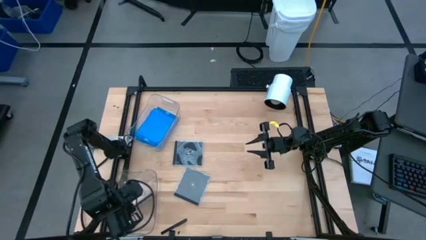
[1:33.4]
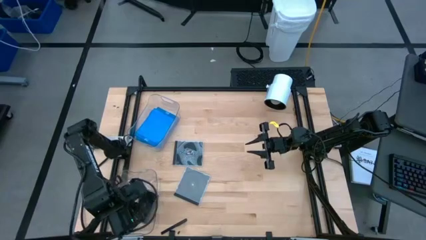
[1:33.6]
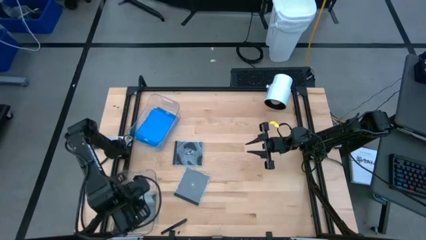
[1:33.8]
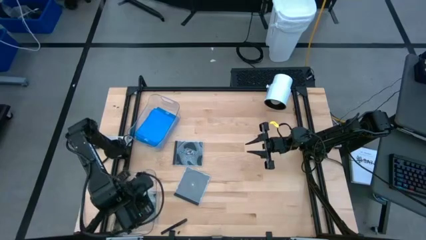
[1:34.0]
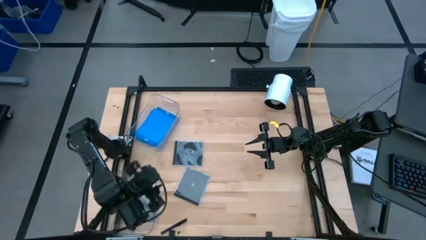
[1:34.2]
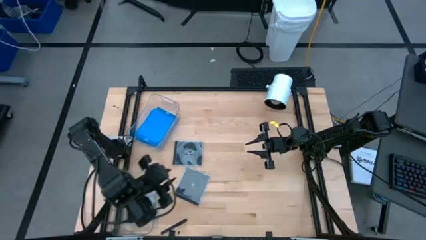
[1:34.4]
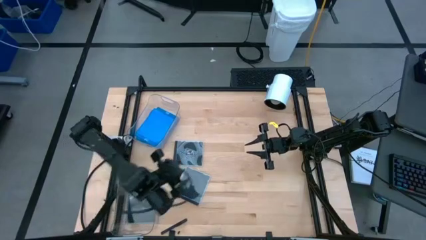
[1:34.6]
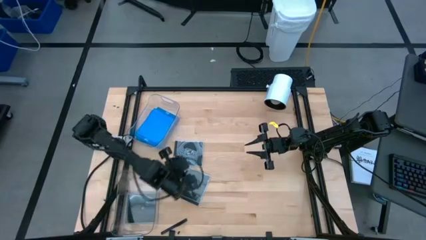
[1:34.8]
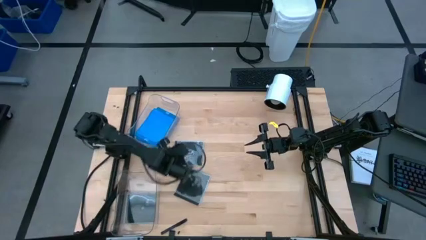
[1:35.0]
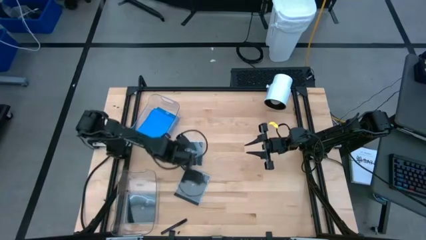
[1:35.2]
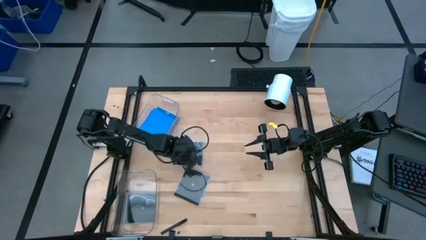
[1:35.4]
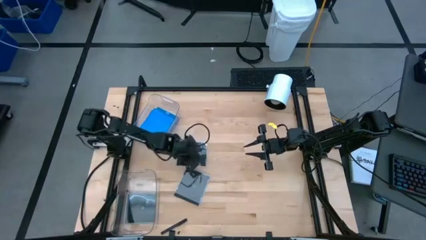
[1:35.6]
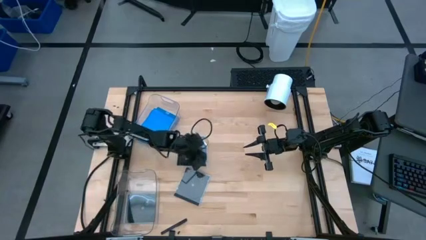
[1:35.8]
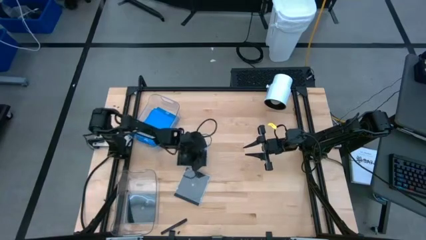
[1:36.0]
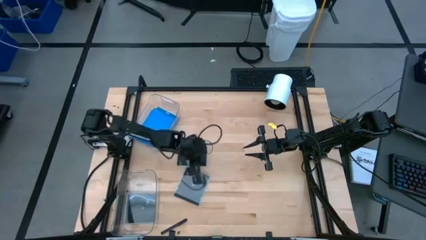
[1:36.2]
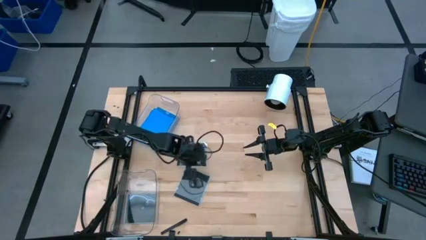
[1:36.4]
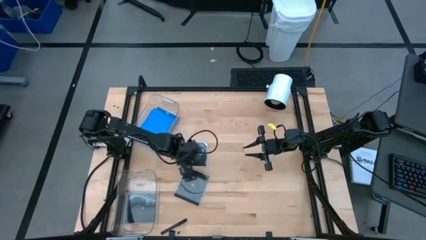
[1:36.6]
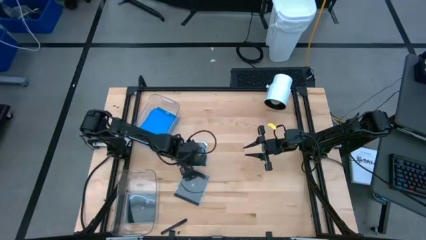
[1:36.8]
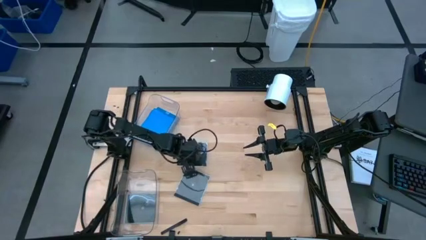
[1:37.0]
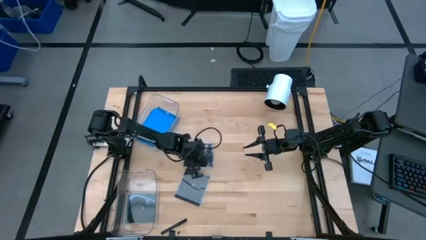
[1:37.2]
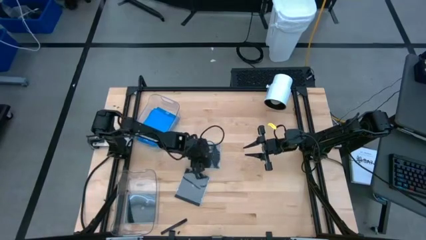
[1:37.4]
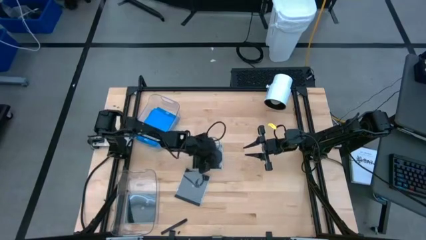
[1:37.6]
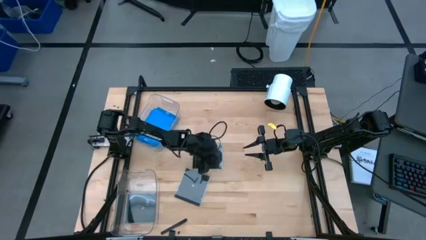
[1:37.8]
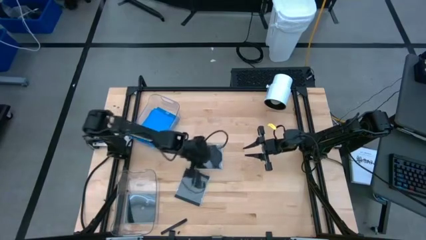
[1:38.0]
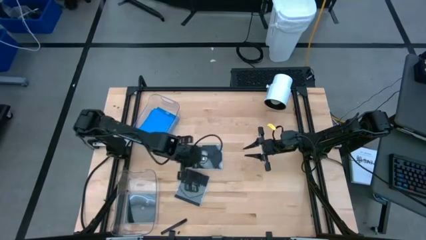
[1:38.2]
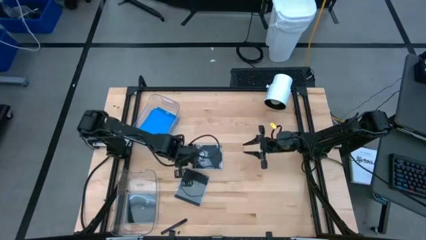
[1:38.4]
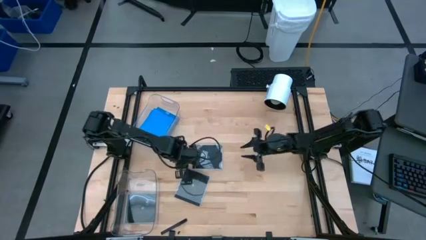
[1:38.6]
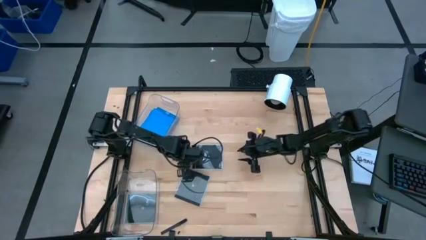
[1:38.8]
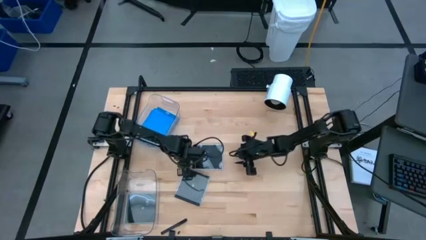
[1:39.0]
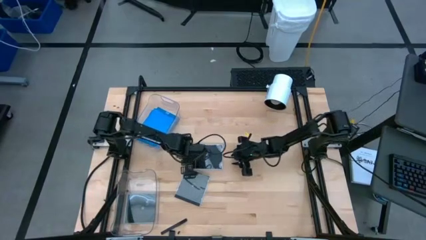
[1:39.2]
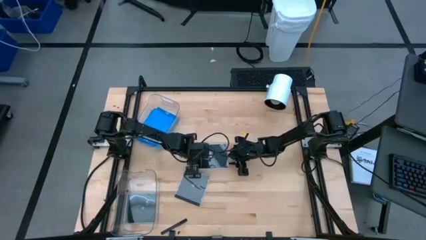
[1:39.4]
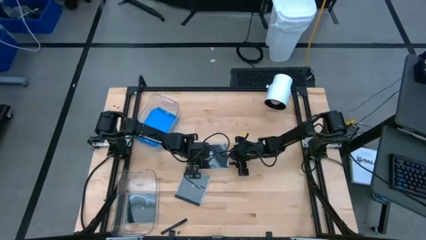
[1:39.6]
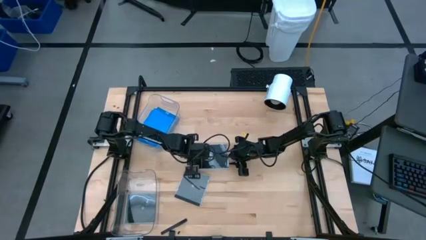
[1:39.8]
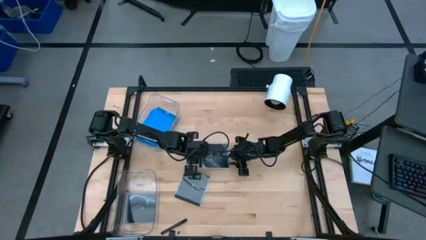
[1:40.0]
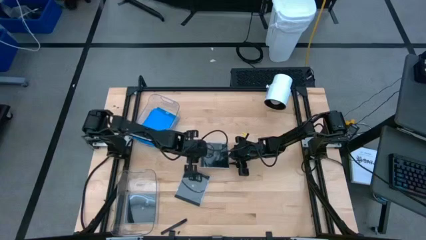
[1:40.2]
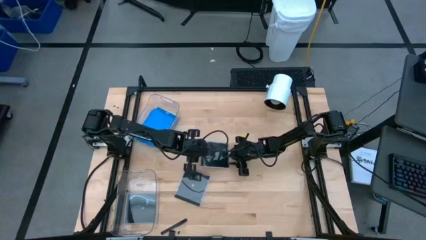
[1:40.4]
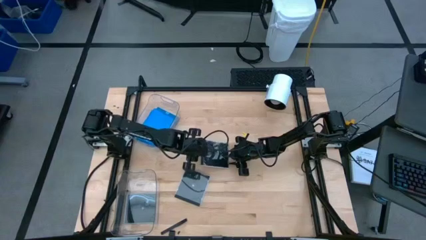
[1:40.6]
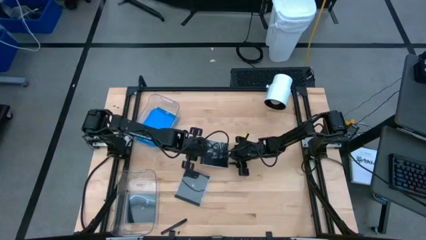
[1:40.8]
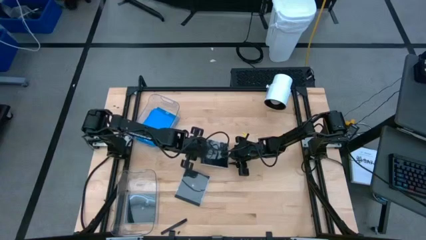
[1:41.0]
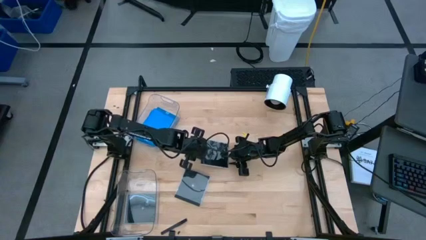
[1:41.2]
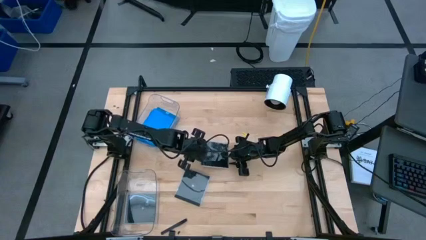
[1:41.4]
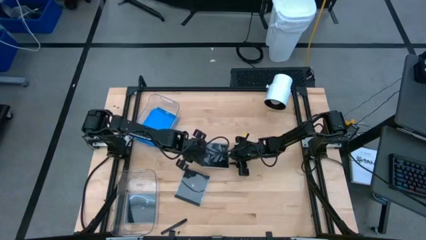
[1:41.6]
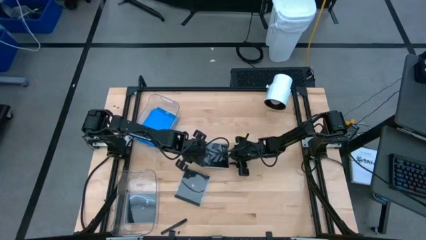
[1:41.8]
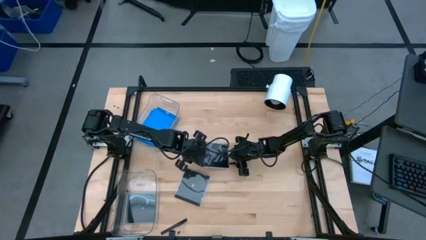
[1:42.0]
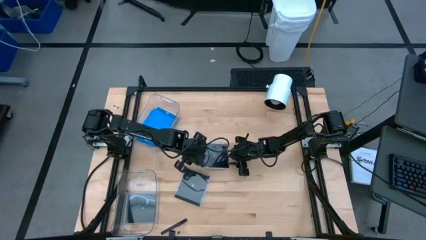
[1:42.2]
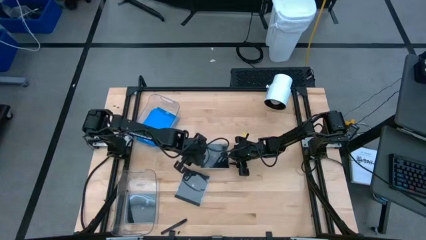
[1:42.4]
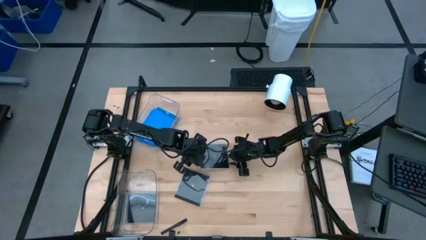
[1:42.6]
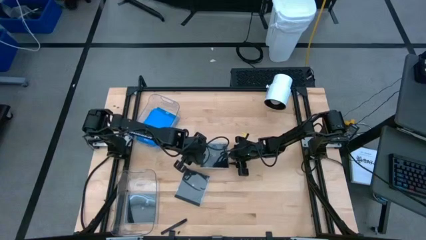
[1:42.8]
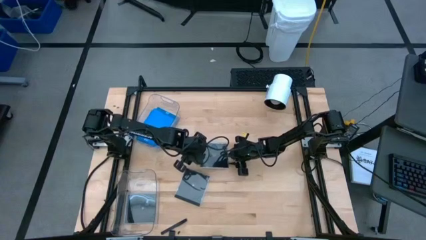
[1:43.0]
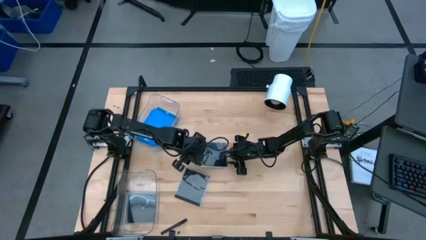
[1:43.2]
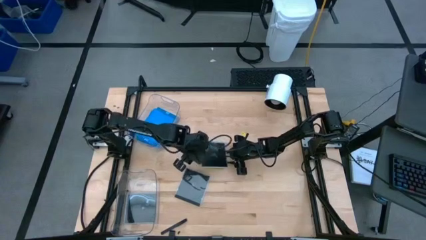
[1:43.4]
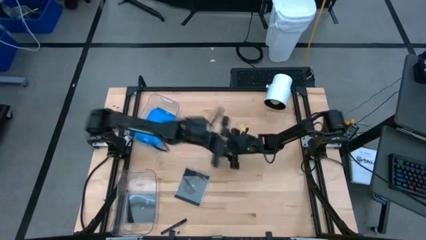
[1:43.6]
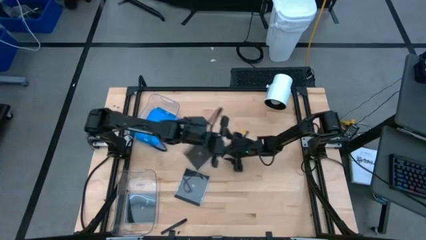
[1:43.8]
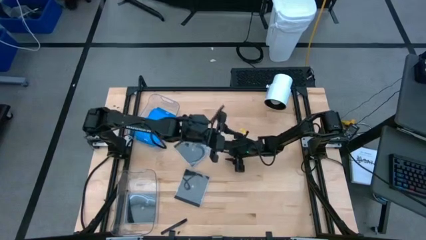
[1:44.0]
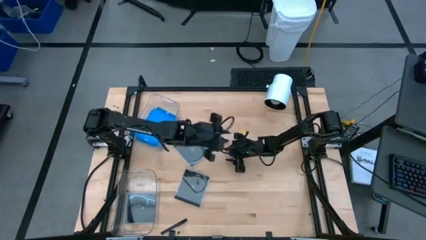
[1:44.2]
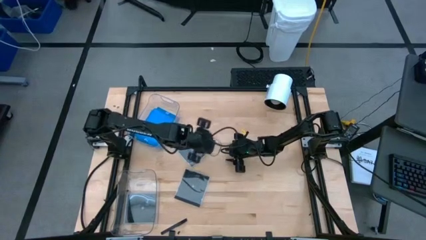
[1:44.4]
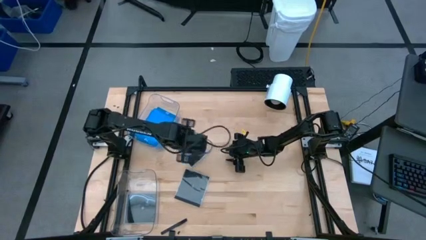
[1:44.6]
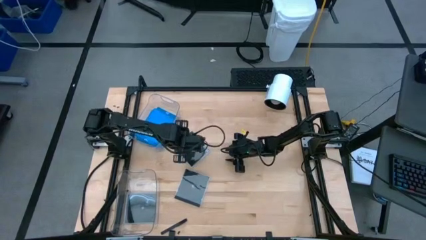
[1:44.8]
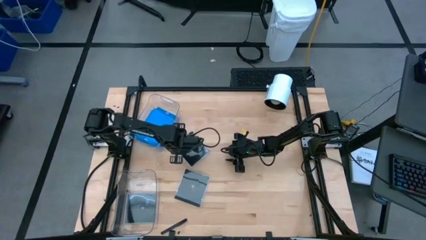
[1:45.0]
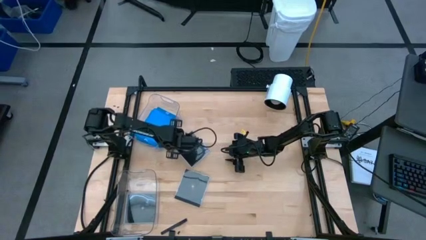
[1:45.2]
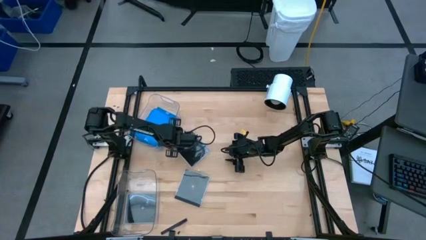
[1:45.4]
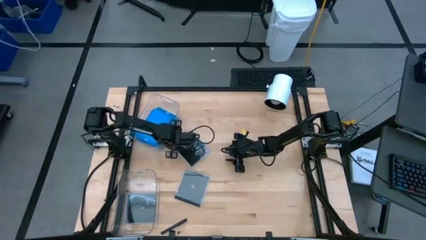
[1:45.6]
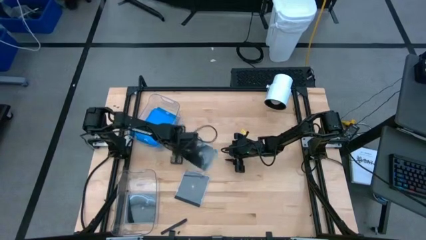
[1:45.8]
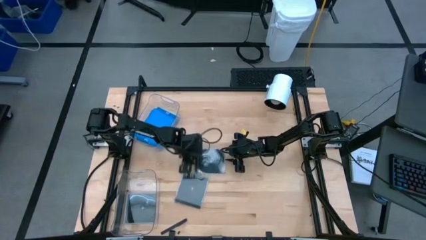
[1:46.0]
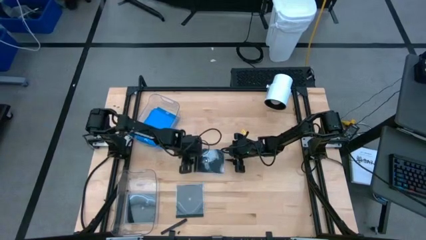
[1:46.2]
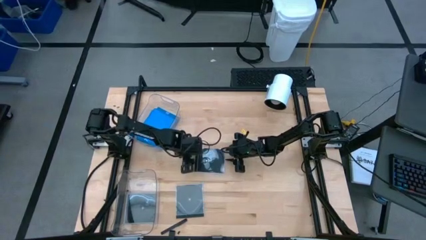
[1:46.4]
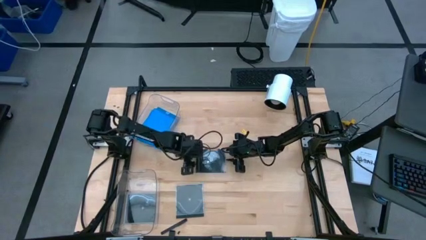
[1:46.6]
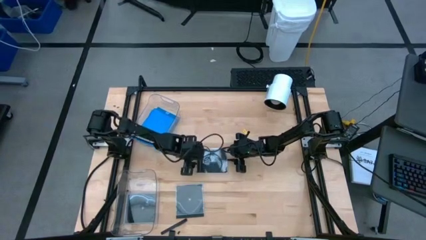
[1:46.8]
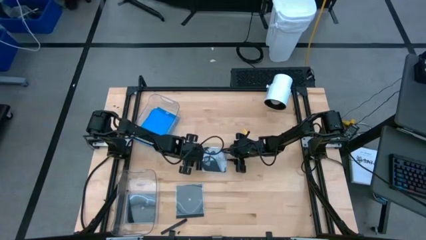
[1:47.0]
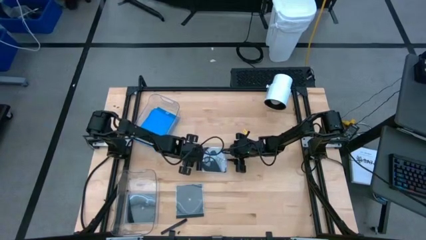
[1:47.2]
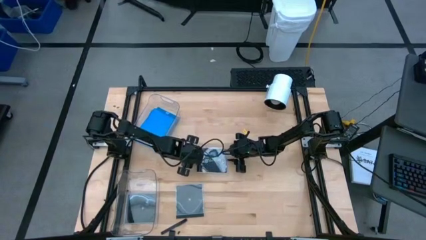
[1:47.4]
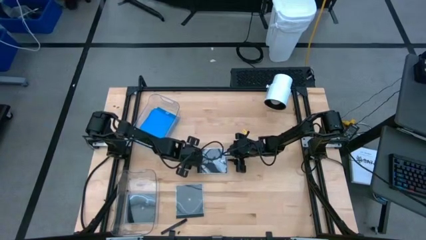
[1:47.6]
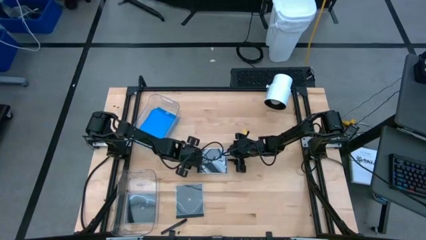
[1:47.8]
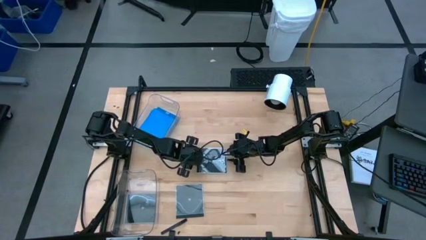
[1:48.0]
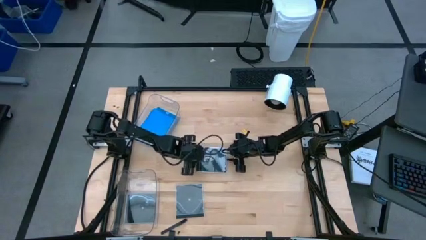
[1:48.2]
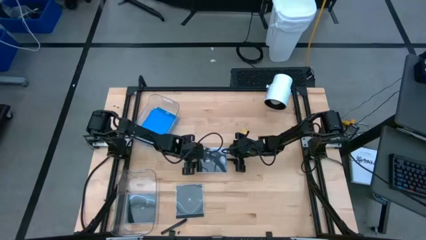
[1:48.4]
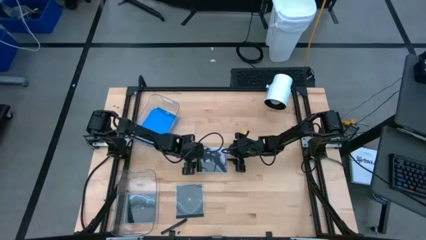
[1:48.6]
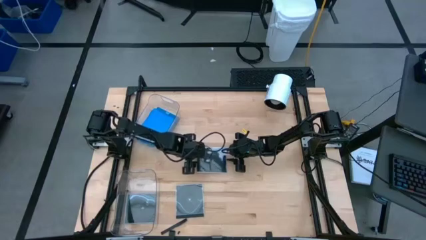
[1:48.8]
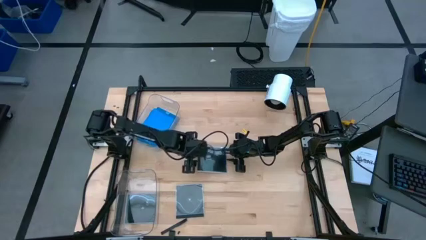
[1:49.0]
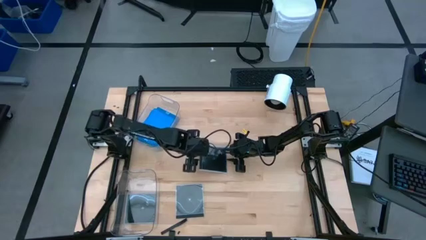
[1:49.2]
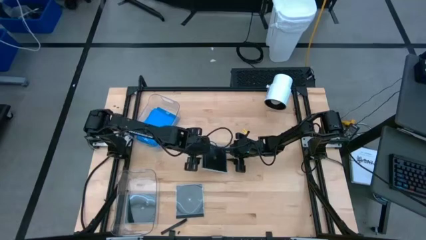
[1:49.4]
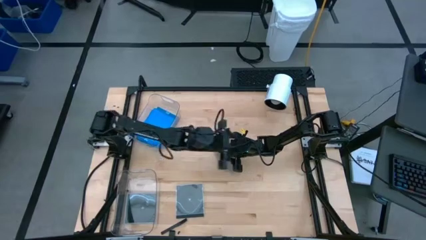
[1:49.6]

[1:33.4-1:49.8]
Task: Pick & place jewel cases by type
Put the top black CD case into the bottom transparent bin
